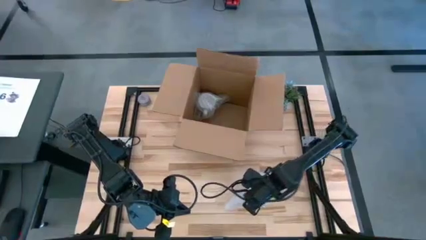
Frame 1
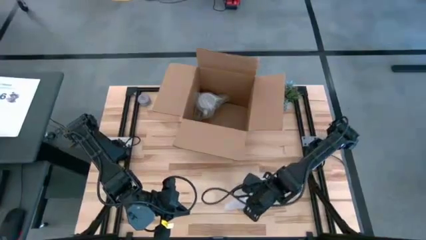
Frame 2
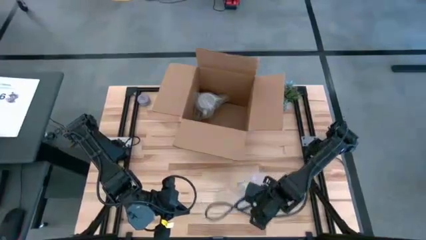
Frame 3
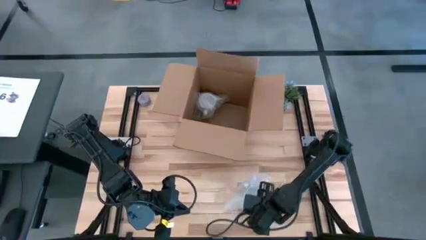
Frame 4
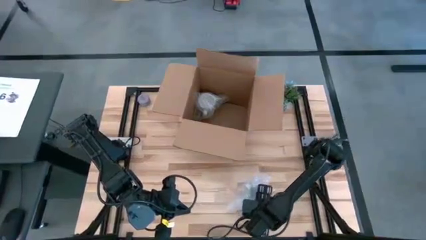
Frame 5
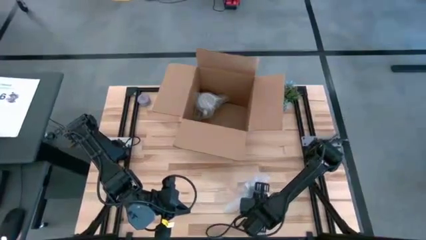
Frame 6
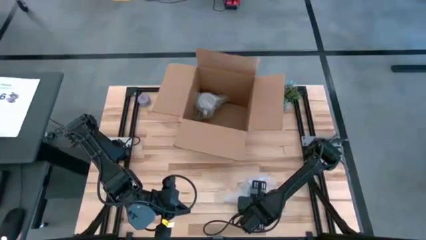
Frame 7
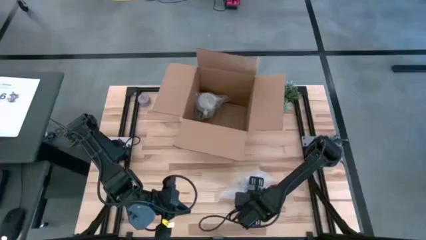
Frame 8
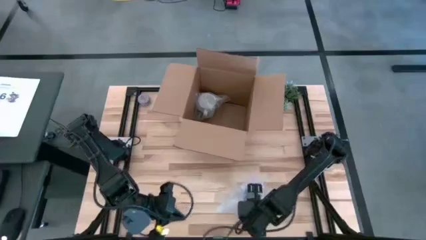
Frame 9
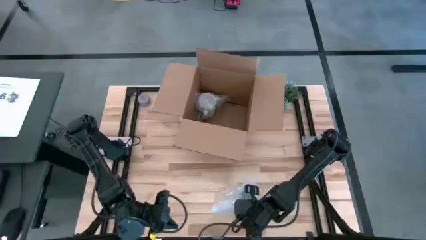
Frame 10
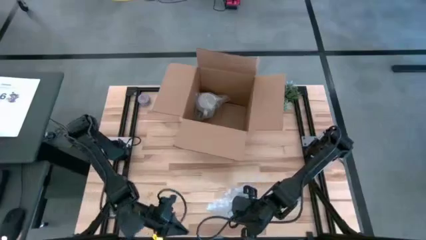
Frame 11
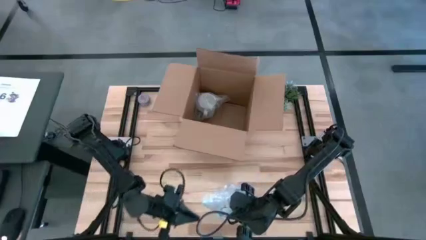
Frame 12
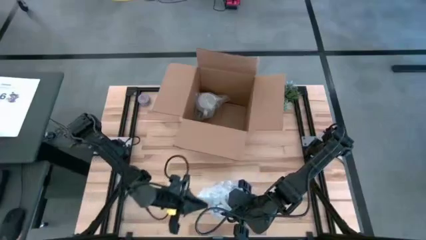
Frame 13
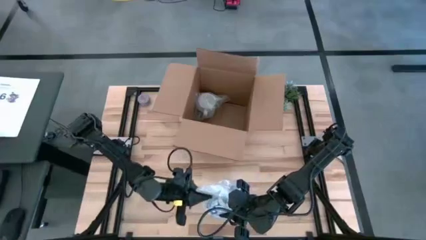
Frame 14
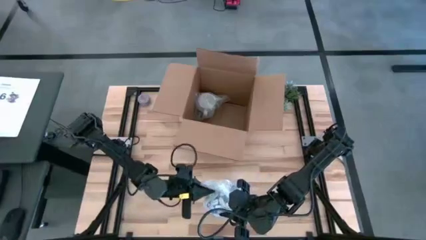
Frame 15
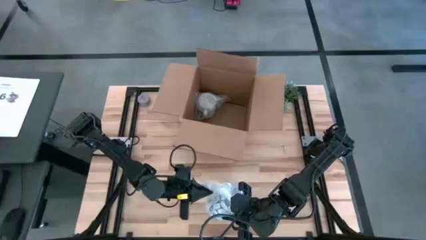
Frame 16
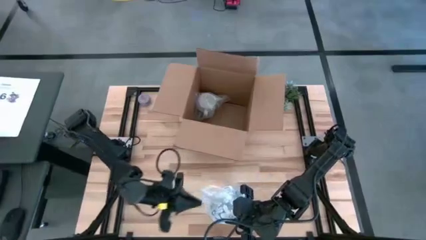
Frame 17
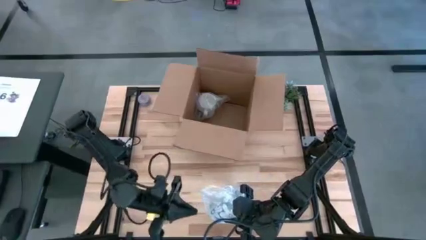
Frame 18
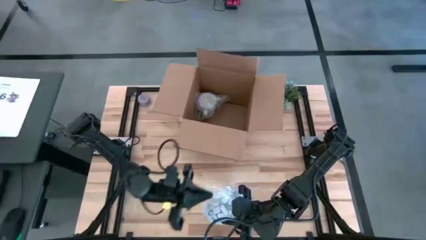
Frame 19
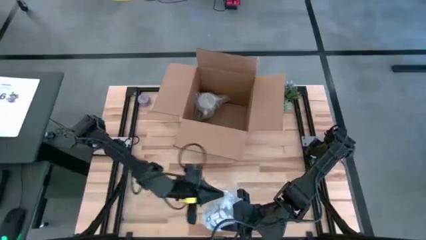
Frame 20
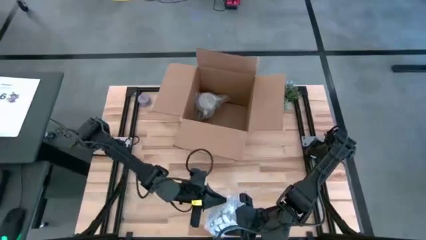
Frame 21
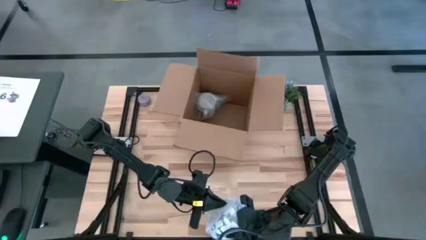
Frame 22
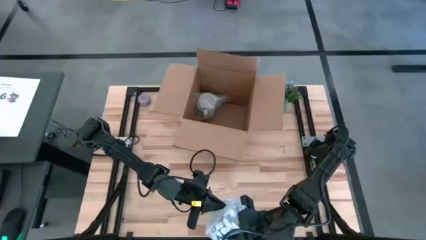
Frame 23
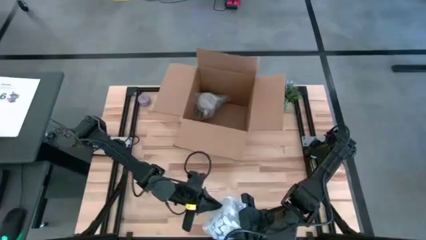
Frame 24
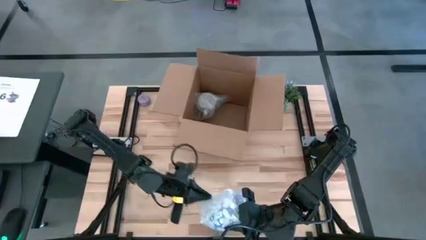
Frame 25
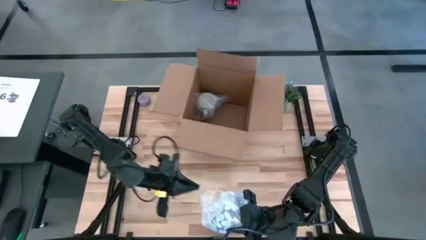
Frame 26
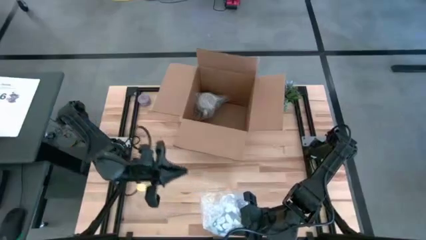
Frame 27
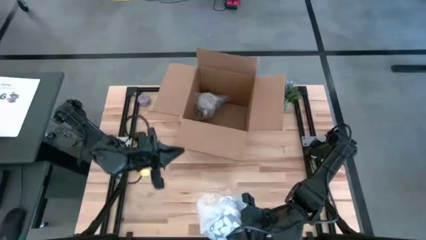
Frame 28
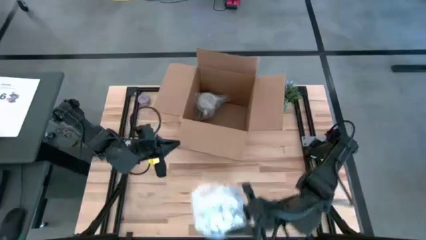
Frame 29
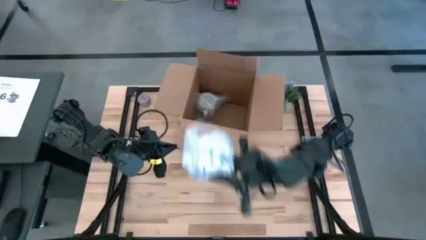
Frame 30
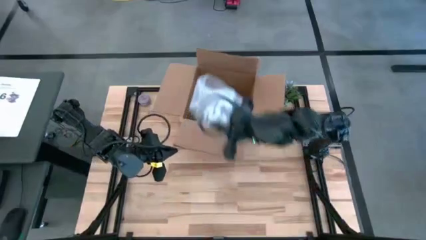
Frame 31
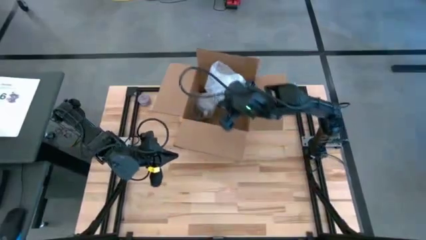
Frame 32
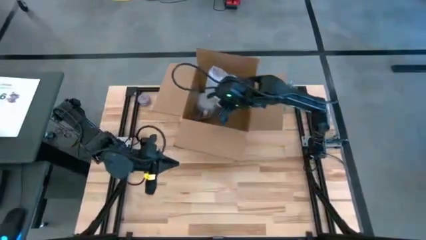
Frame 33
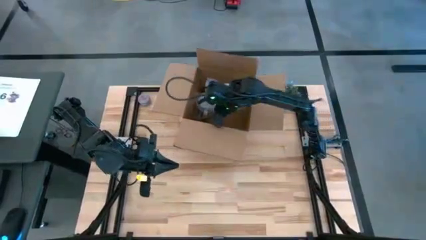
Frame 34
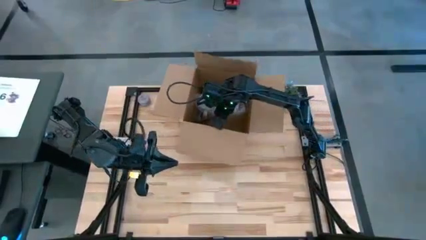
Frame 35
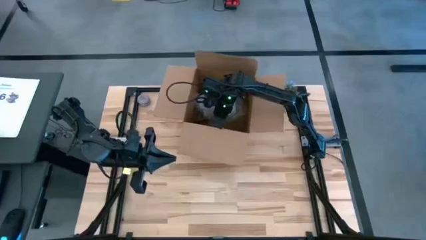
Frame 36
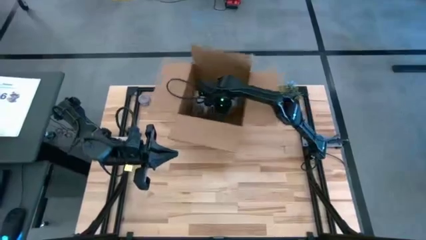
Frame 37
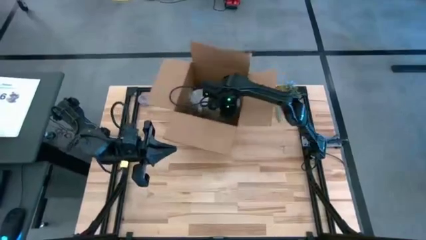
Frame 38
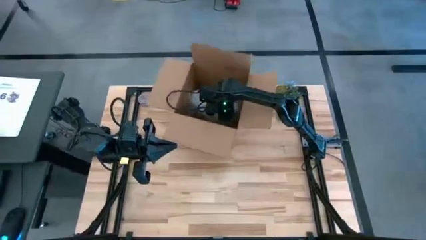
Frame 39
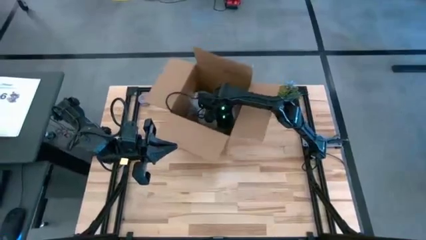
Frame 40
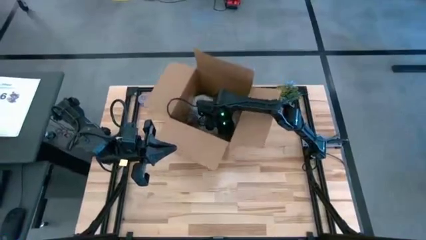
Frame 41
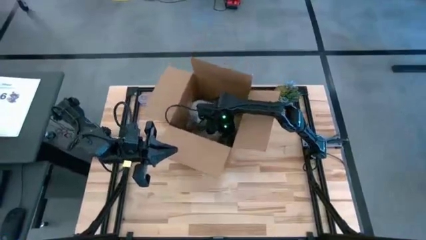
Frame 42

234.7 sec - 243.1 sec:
Task: wrap mug
Put the wrapped white blue mug into the cardboard box

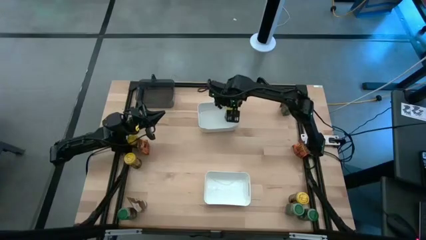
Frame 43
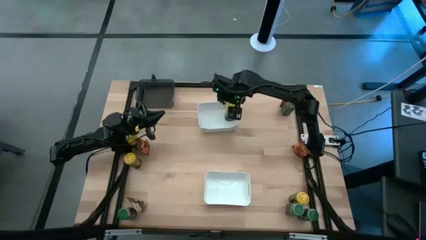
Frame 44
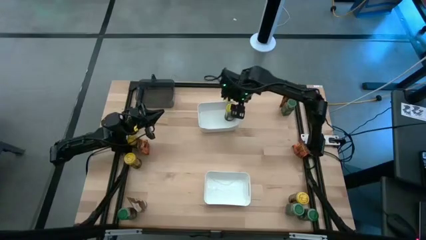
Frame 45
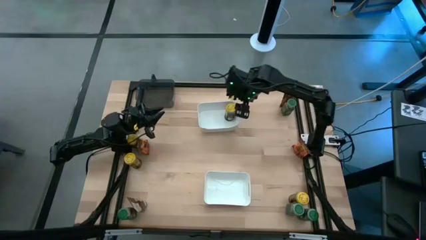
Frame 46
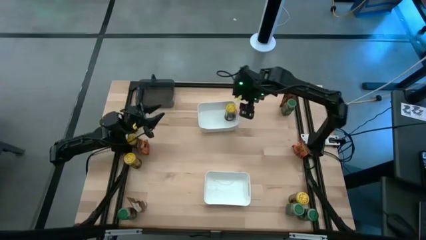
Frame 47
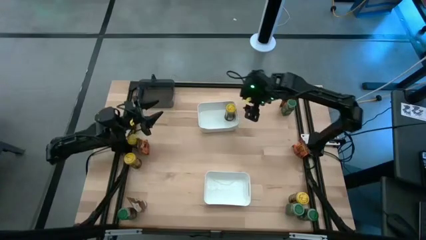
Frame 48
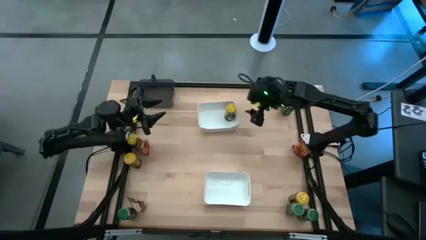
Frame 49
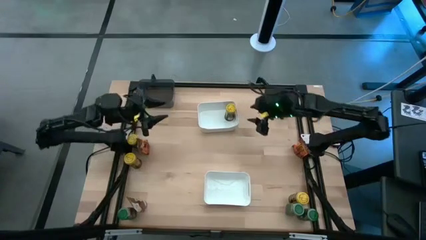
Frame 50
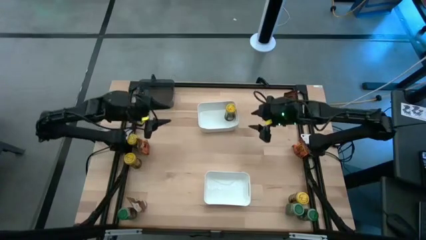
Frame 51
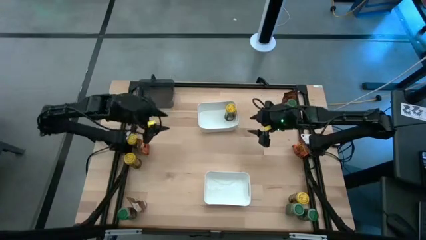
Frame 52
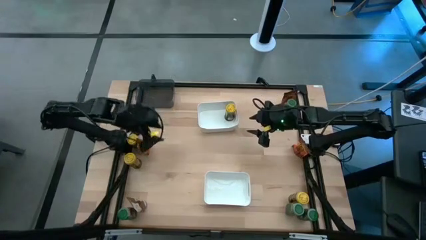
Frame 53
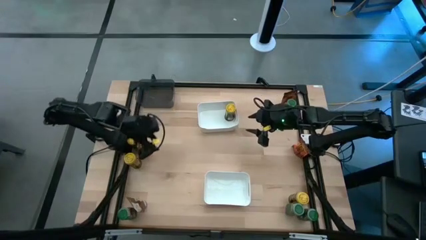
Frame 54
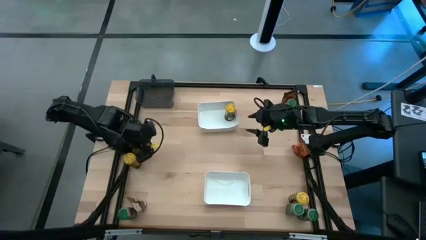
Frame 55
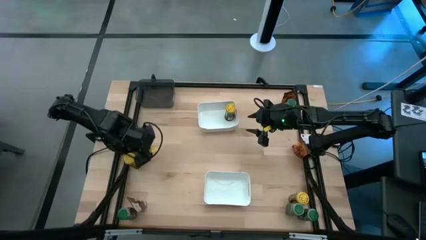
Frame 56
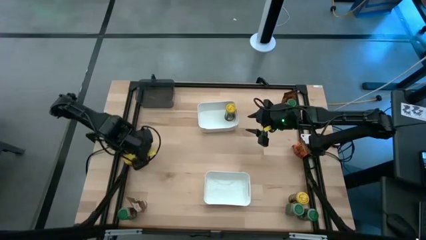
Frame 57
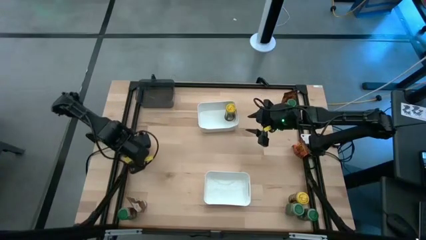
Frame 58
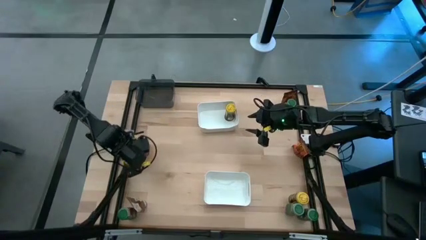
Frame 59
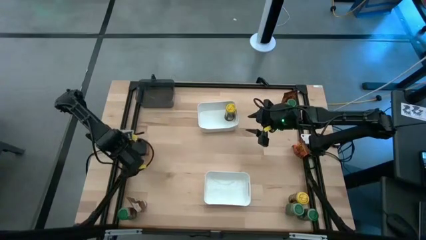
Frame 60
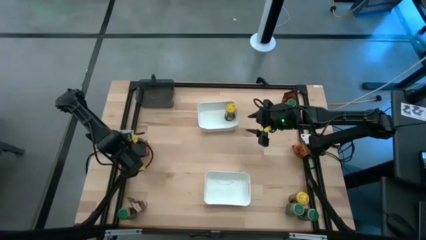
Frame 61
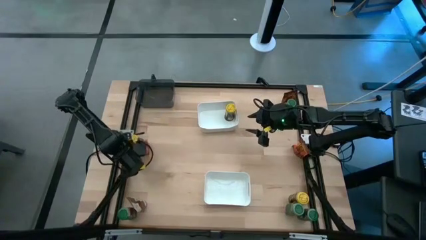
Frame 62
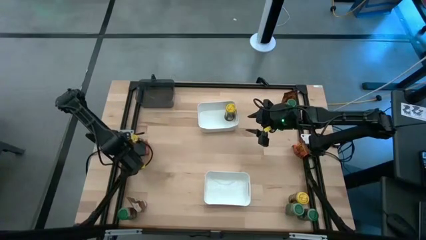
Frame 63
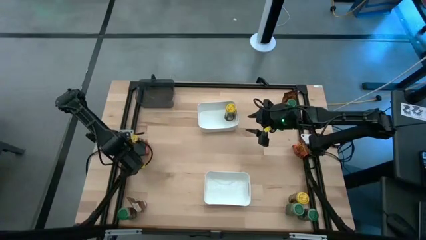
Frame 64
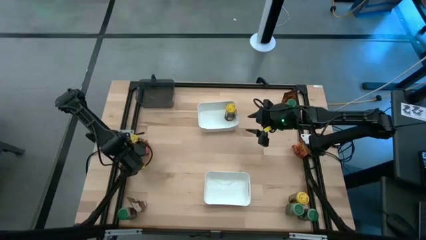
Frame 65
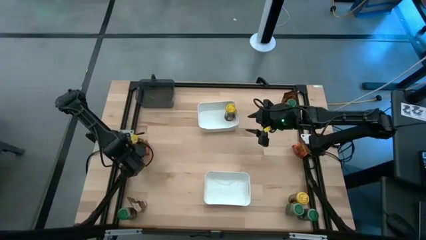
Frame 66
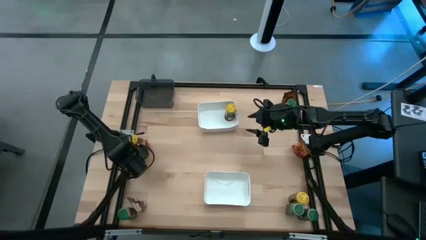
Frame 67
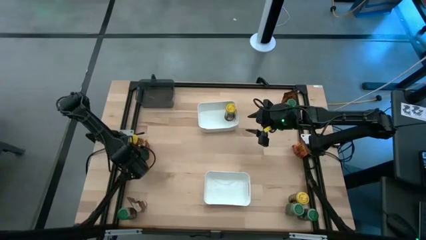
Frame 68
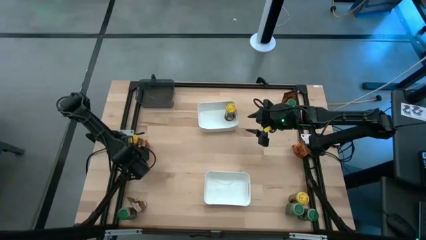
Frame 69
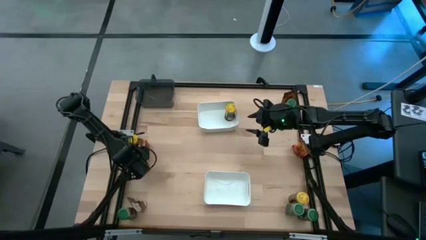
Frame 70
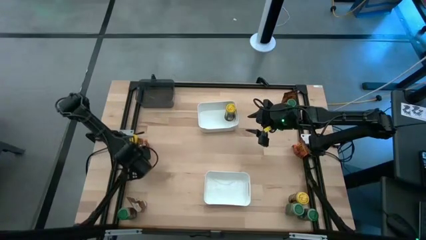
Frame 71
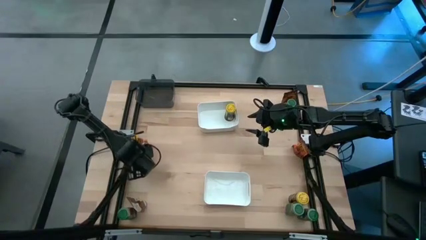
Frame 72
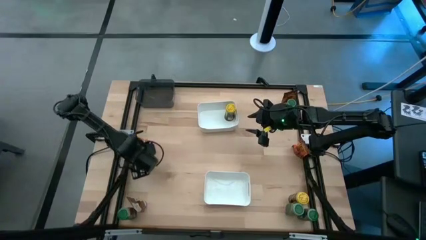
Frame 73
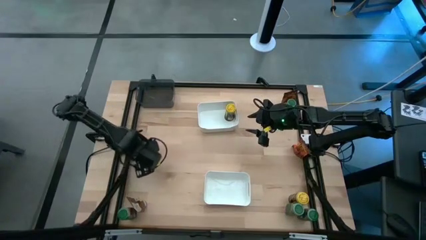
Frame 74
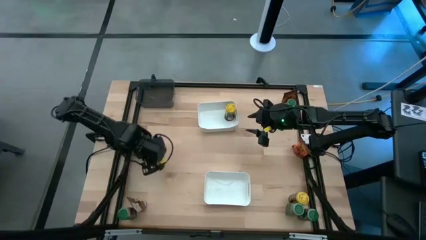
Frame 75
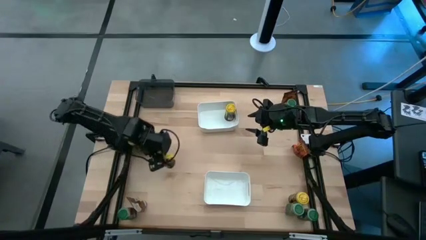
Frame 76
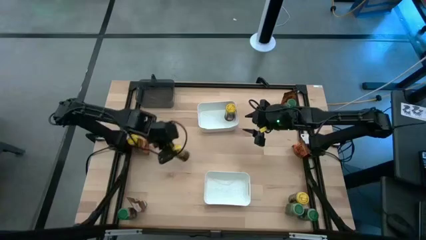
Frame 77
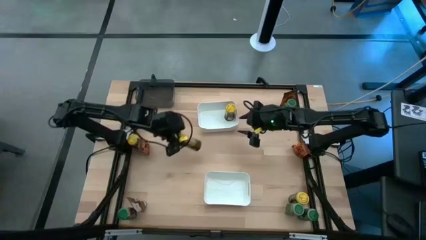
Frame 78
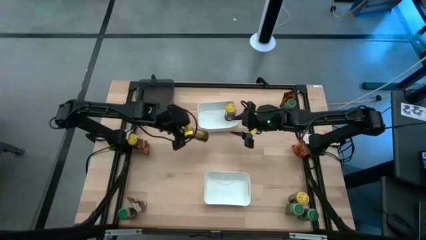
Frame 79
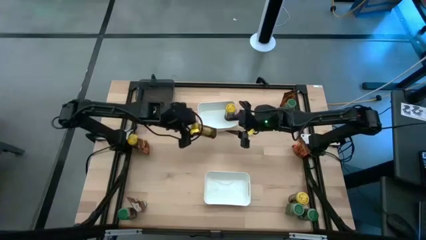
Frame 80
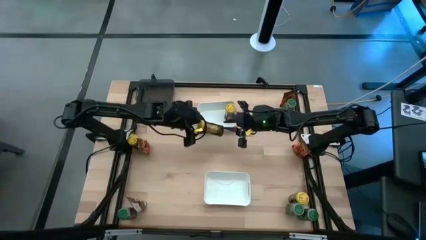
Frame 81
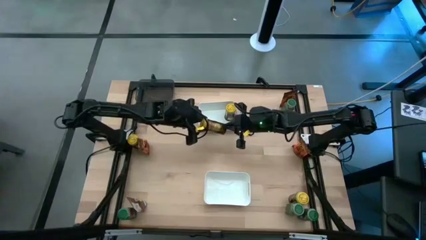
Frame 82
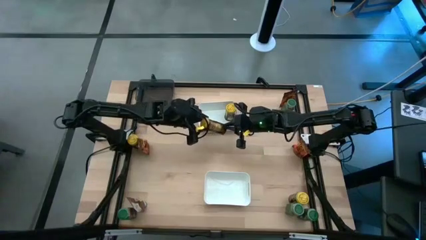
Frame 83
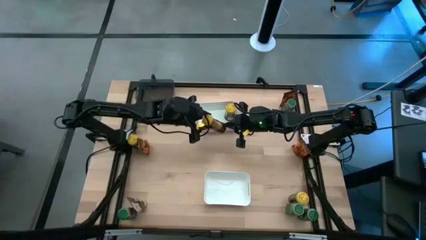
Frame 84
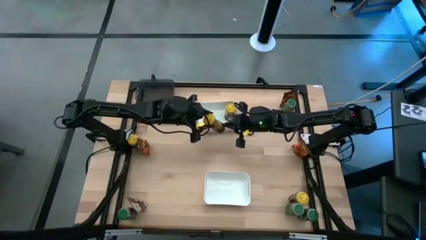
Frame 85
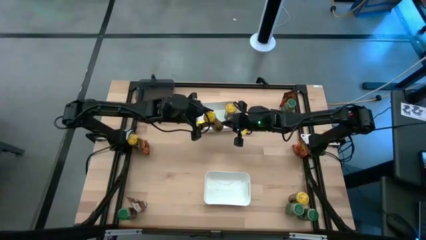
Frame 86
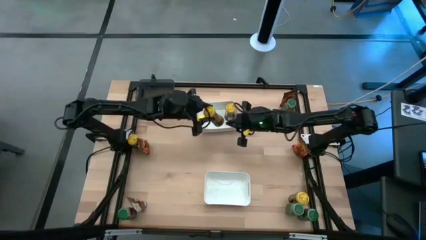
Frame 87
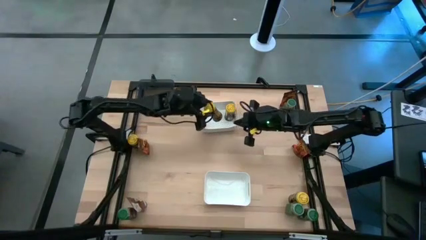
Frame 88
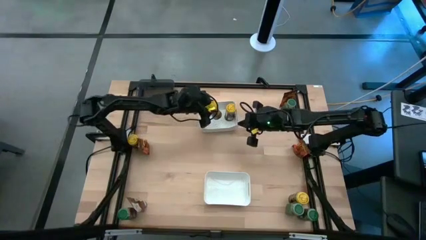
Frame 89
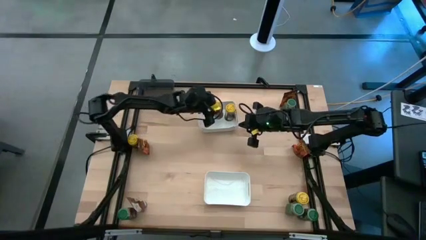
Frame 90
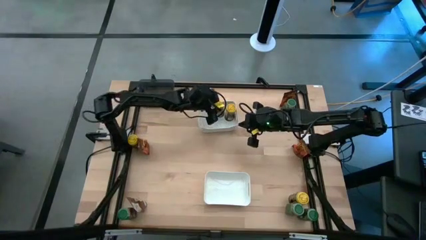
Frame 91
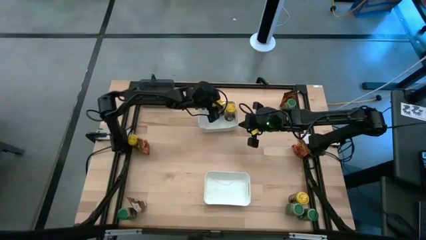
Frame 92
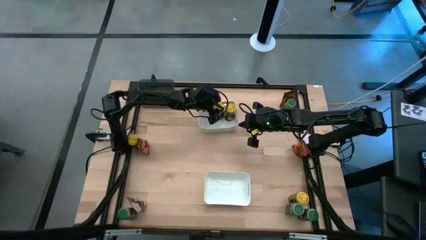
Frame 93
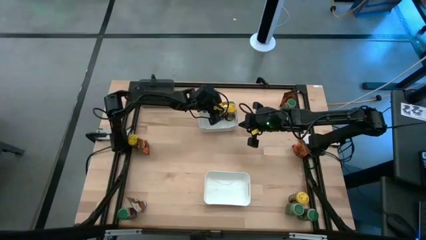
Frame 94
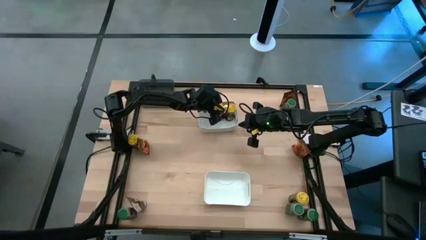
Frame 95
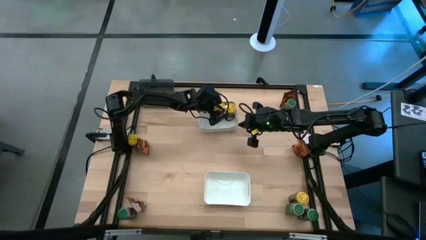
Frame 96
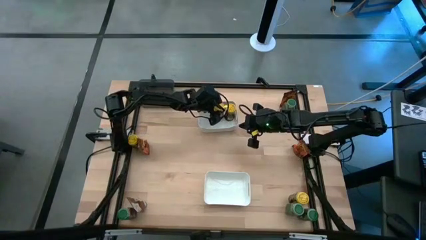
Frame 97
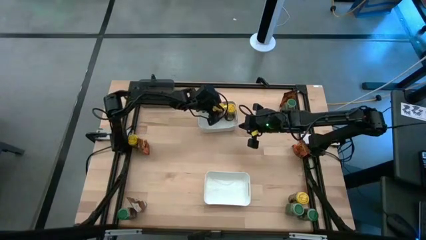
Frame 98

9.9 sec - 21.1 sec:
Task: Sort spices by type
Put the yellow seasoning bottle into the top white bin
